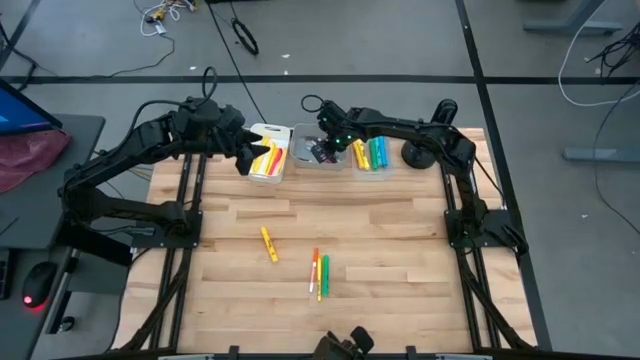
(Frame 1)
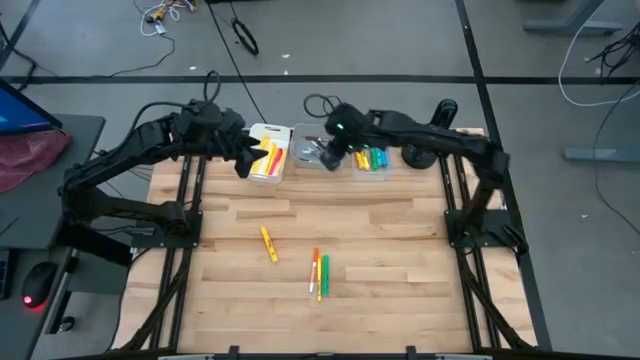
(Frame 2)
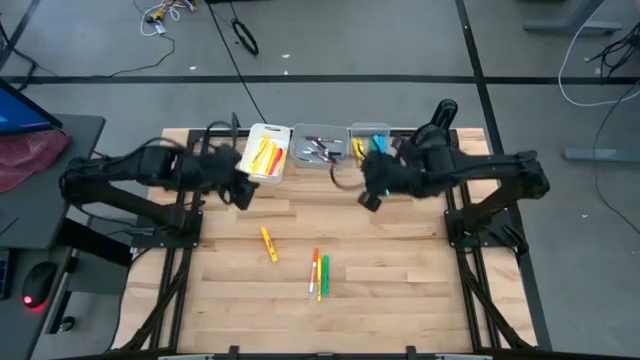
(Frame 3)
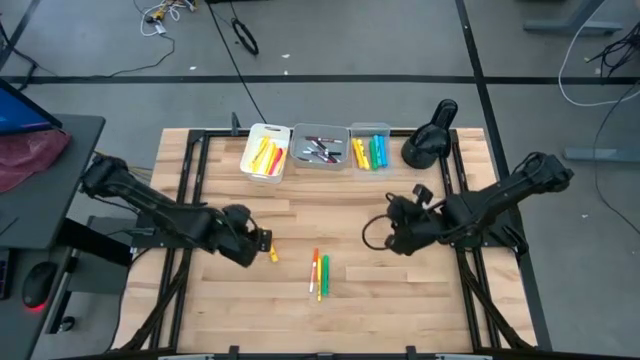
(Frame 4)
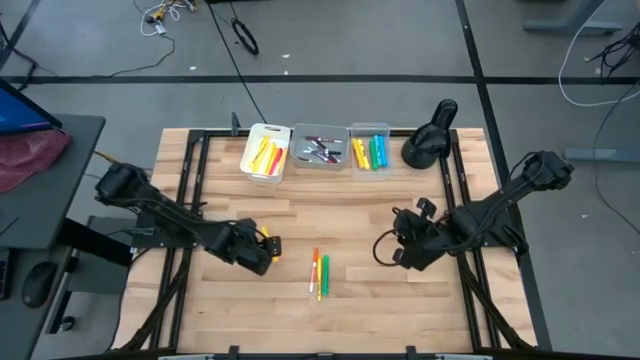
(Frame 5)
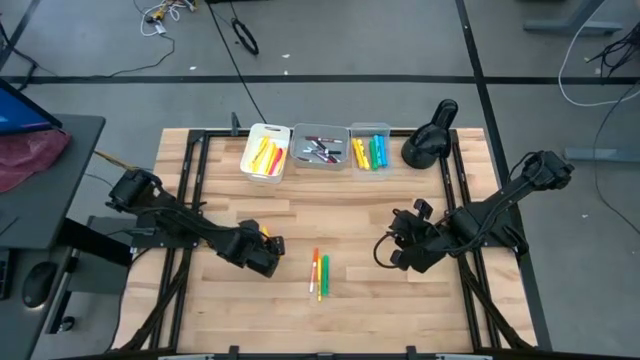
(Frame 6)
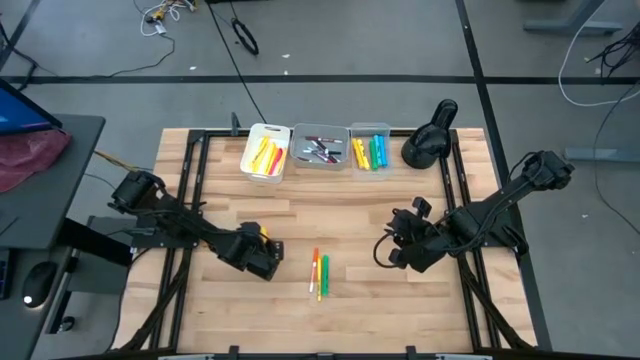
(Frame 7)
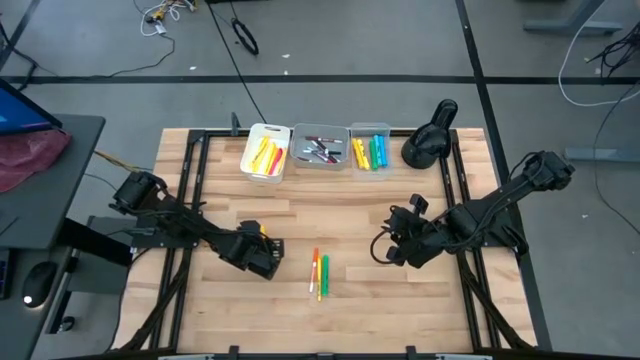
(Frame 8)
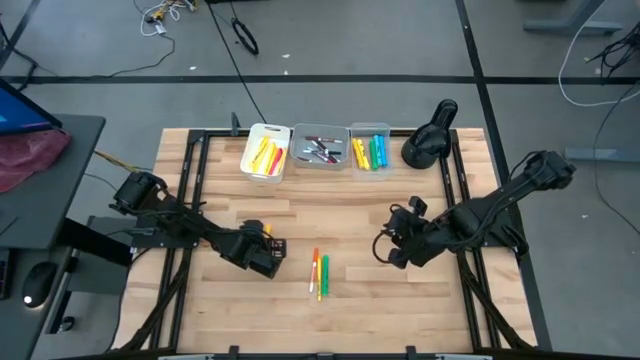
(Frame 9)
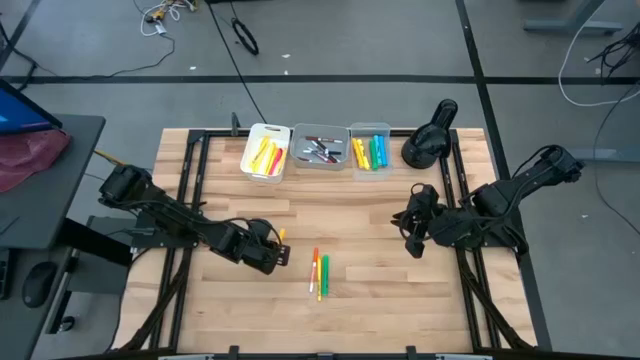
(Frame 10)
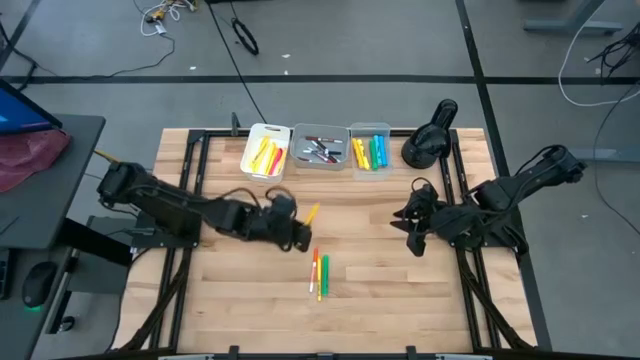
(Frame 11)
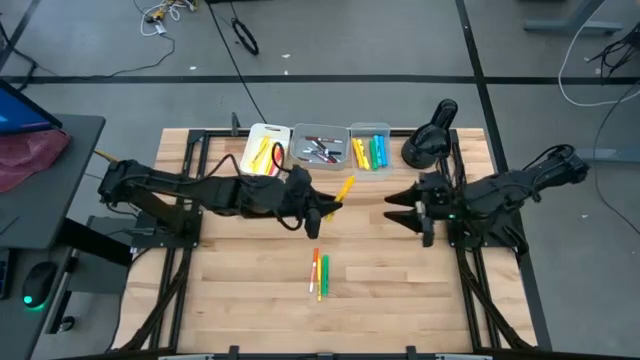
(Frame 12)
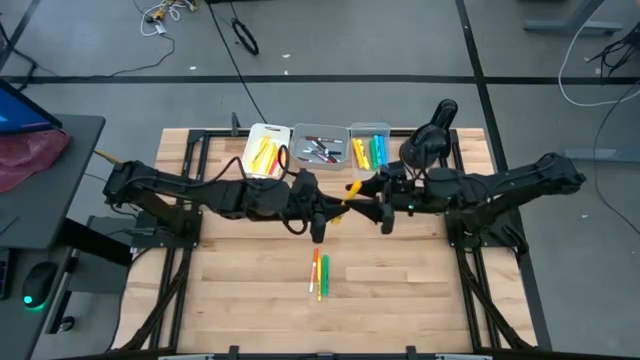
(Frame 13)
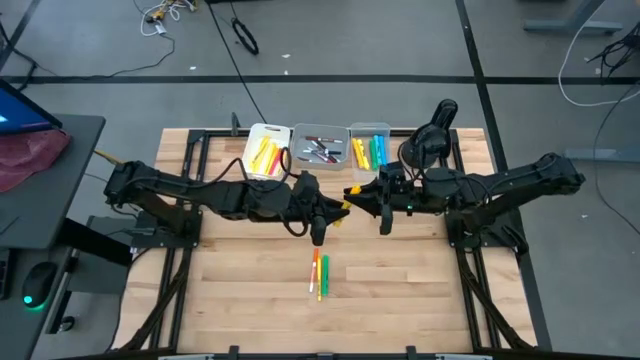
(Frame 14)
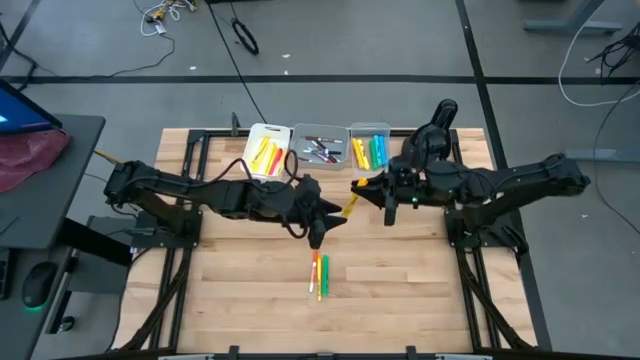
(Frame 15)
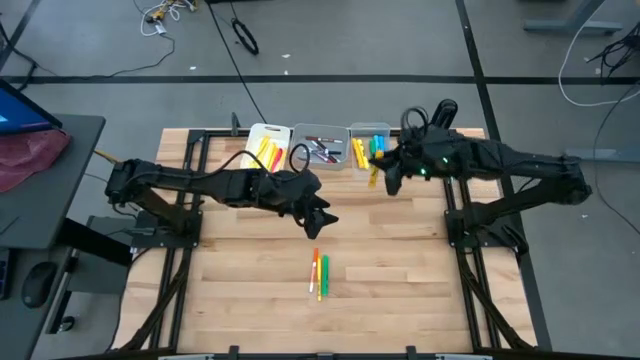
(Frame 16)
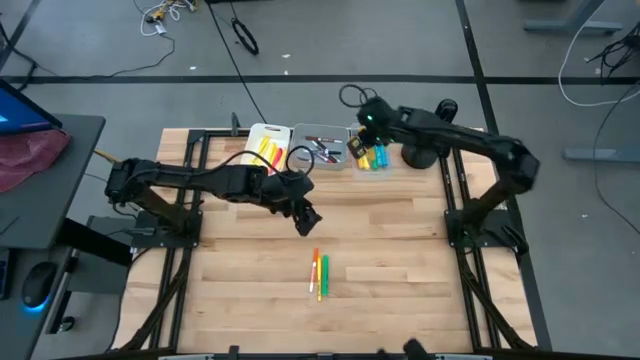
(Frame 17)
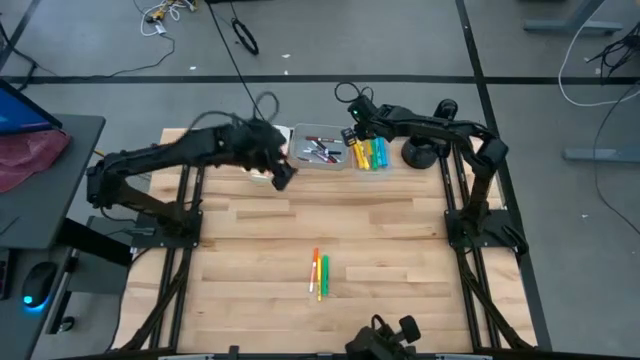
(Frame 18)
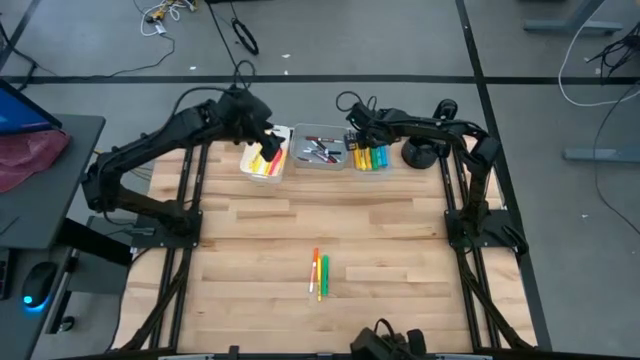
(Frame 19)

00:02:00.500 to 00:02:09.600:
Task: Pick & Place Markers
Put the yellow highlighter pen into the transparent bin

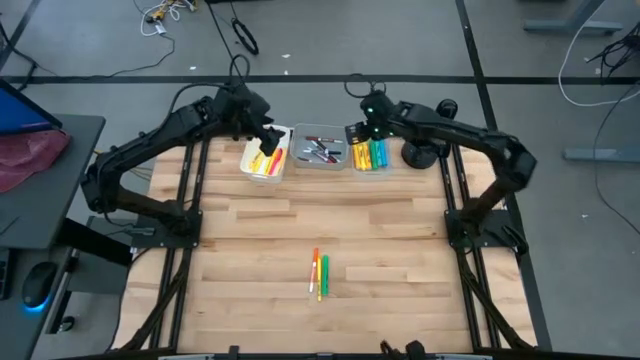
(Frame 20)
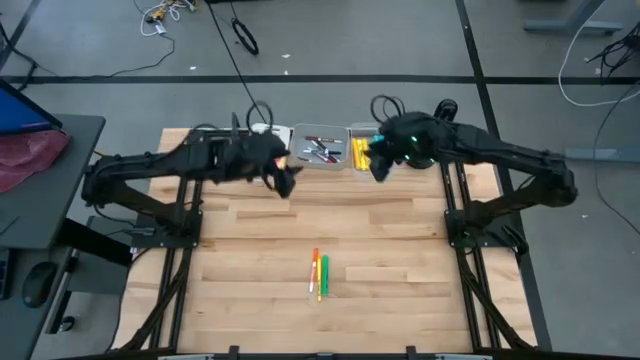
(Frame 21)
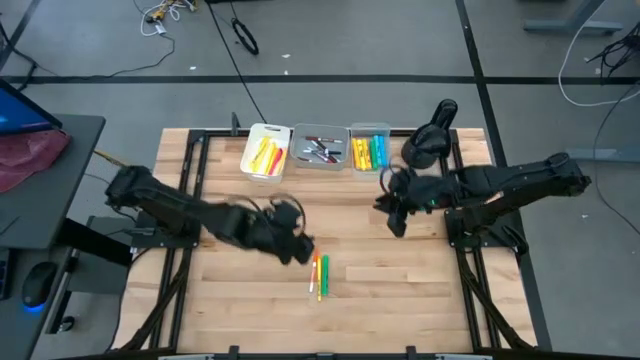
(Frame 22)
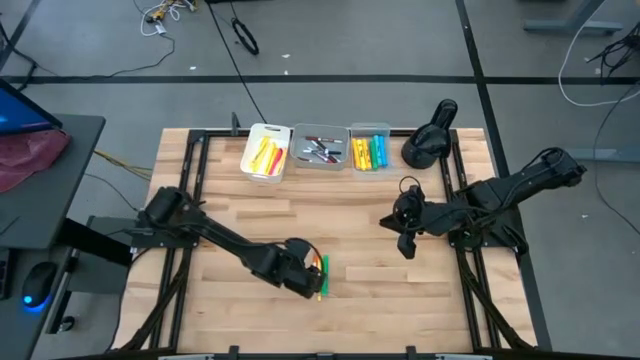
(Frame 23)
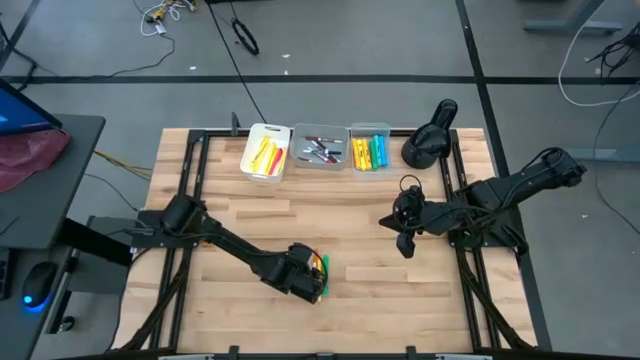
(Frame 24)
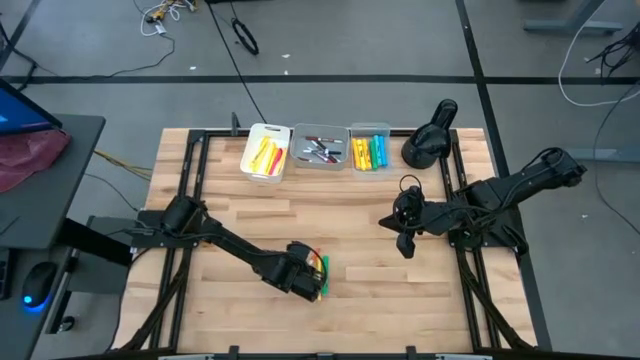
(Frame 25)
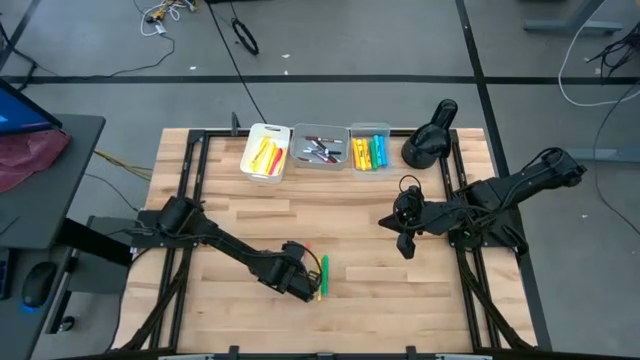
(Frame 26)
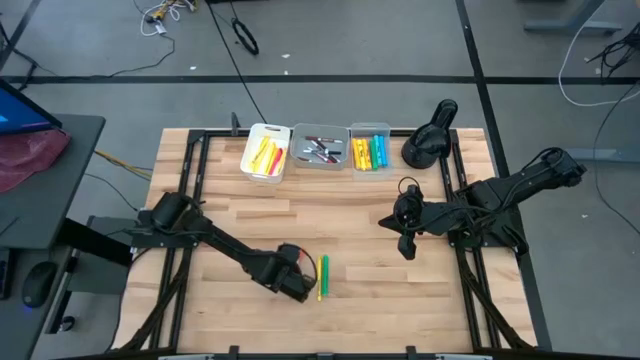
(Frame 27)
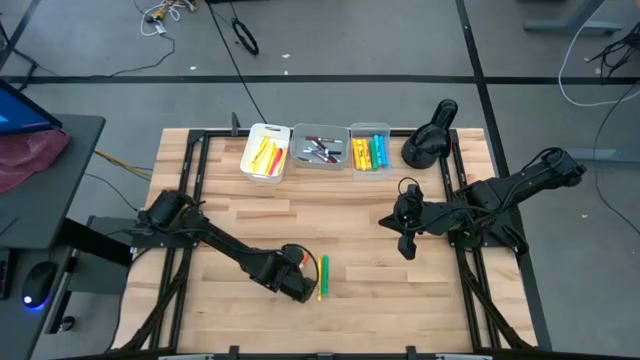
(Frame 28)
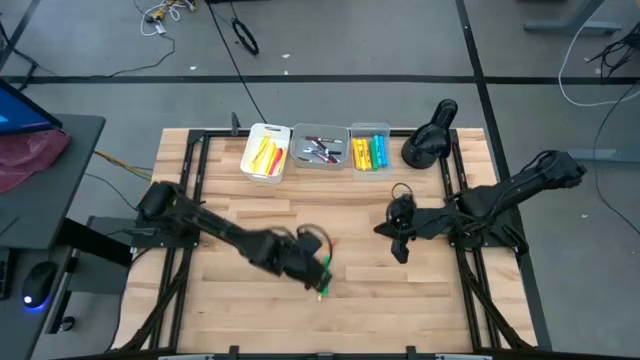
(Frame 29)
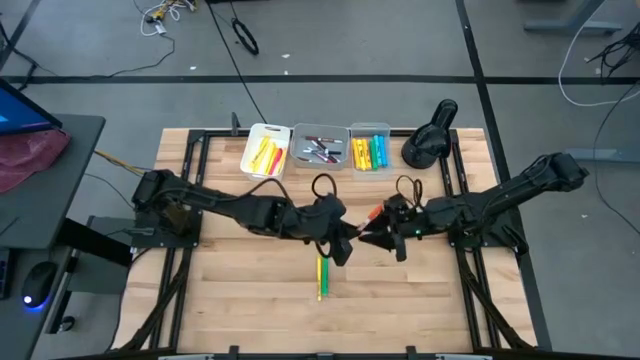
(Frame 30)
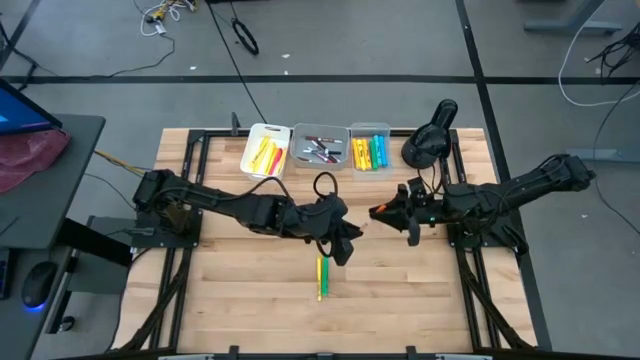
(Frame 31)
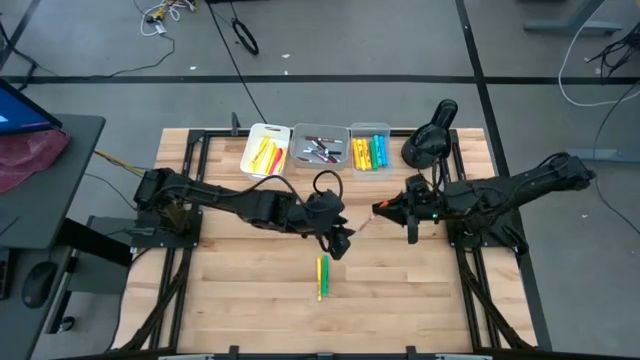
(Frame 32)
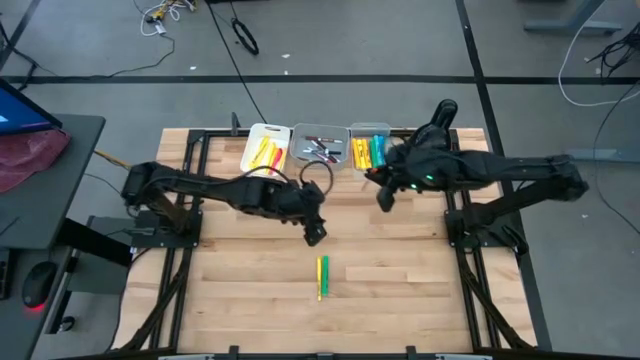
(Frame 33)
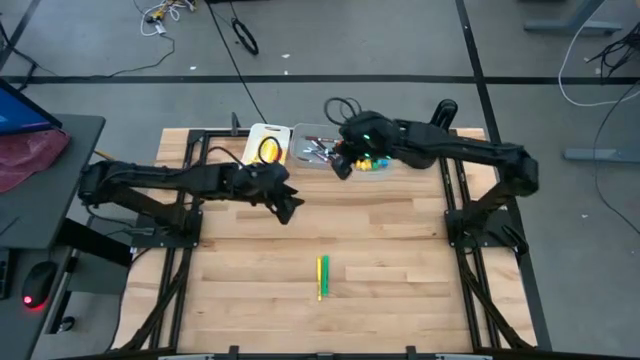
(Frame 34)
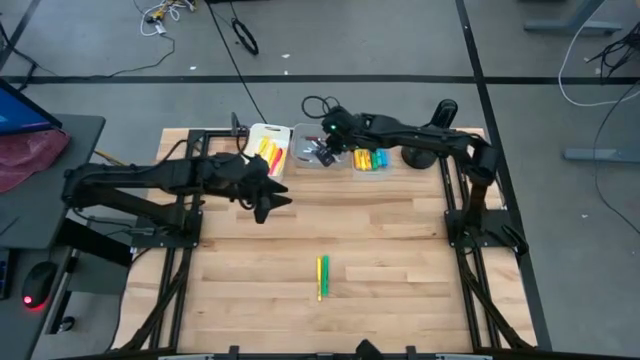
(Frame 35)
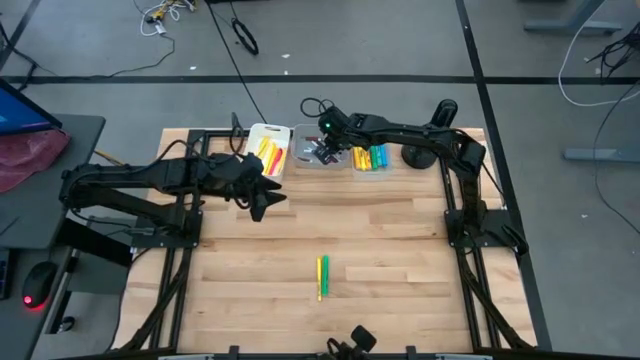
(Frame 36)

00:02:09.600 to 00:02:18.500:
Put the orange marker pen into the gray bin

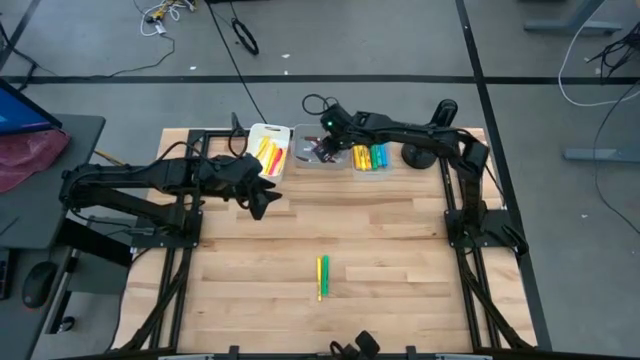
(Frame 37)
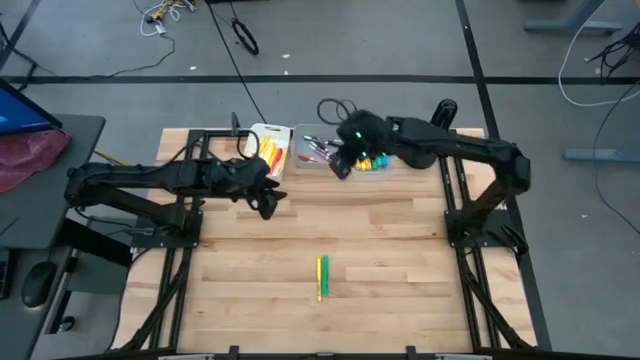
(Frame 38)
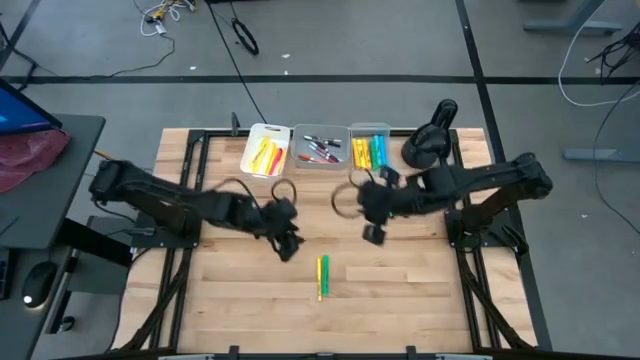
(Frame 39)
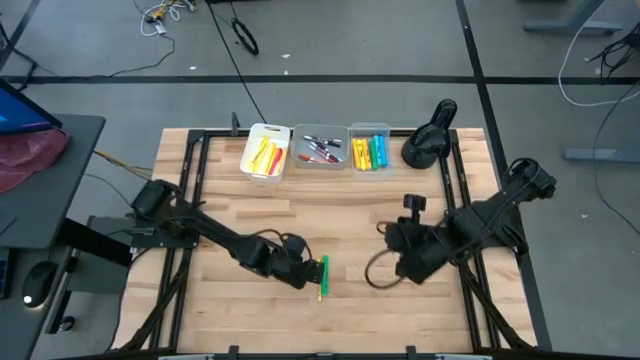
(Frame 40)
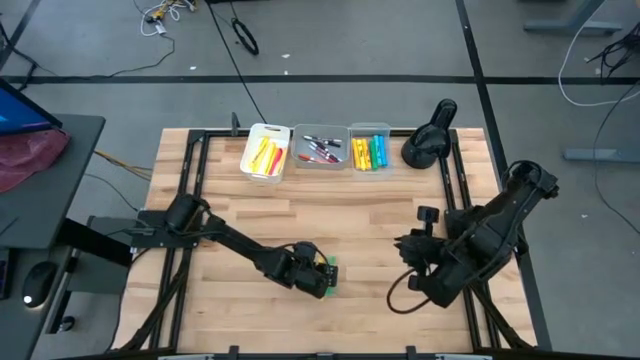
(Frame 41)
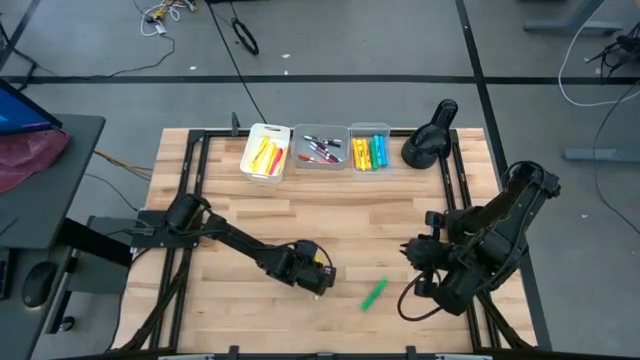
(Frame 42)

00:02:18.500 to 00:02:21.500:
Put the yellow pen into the white bin
